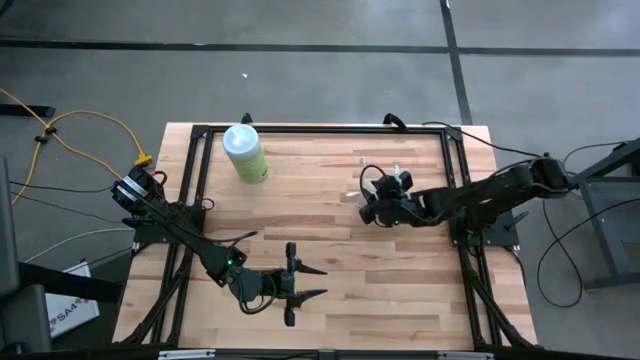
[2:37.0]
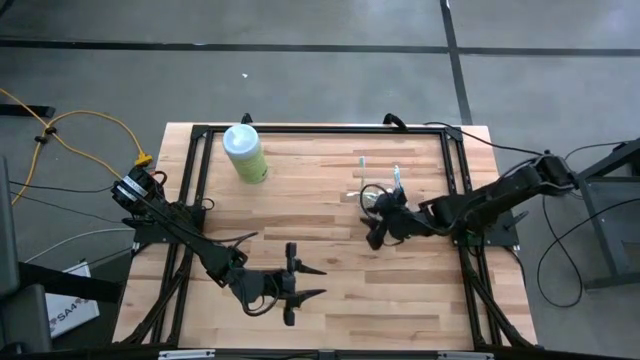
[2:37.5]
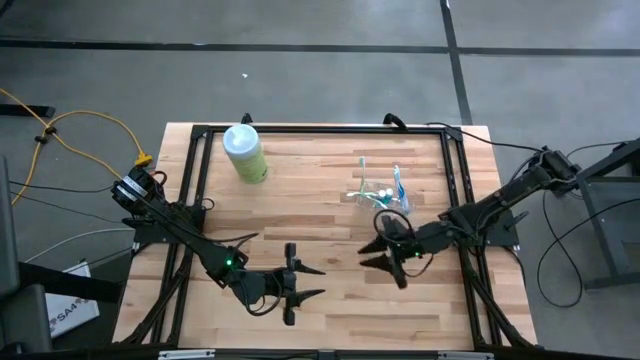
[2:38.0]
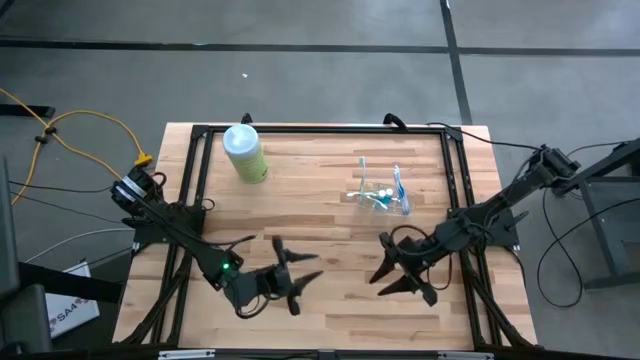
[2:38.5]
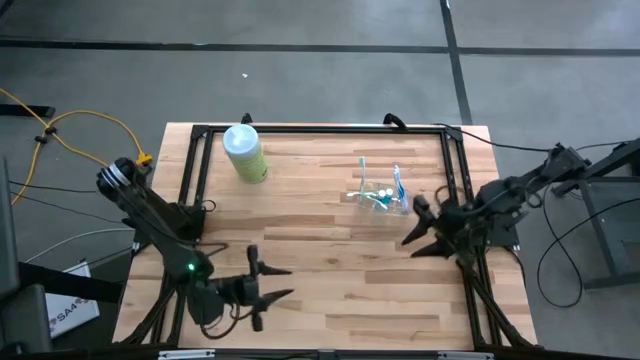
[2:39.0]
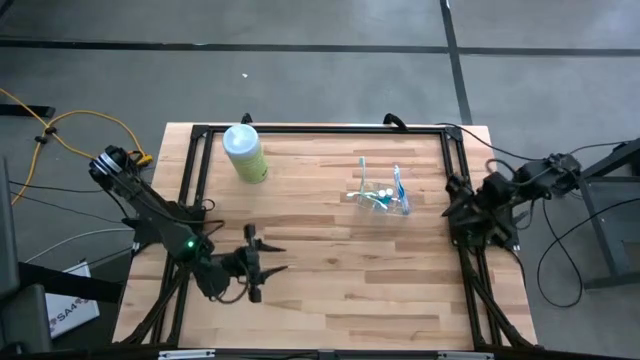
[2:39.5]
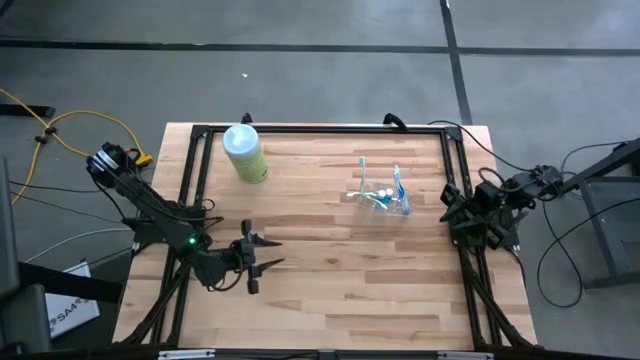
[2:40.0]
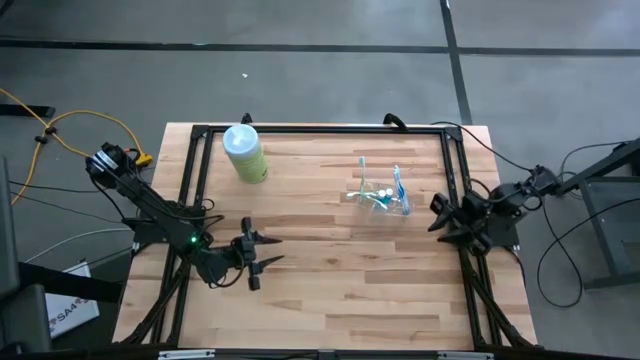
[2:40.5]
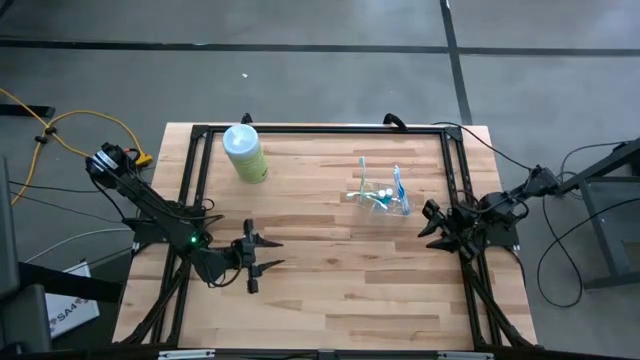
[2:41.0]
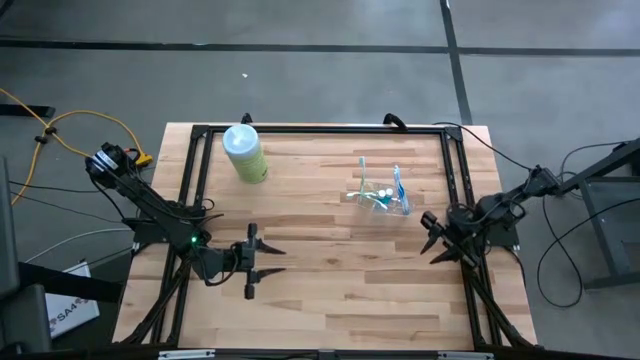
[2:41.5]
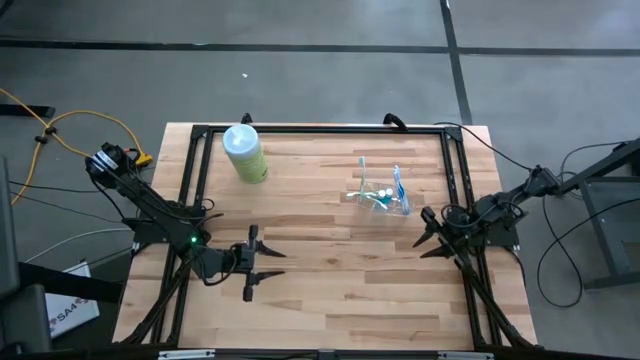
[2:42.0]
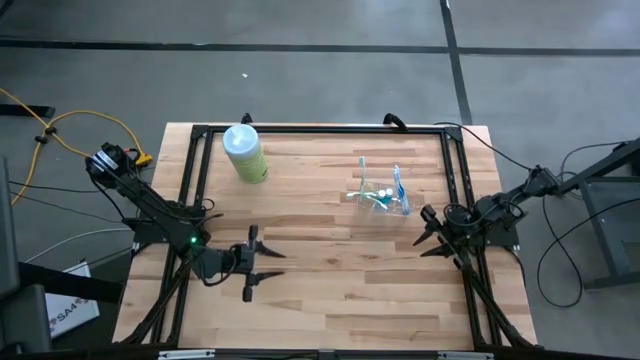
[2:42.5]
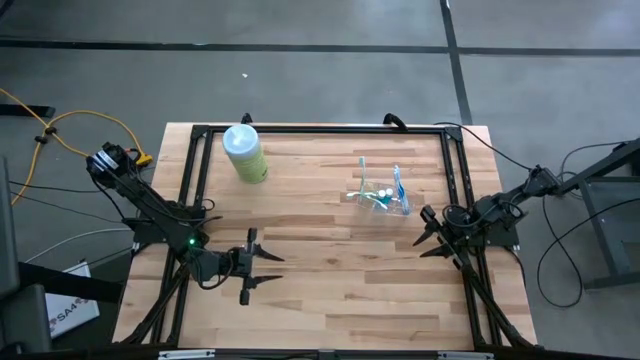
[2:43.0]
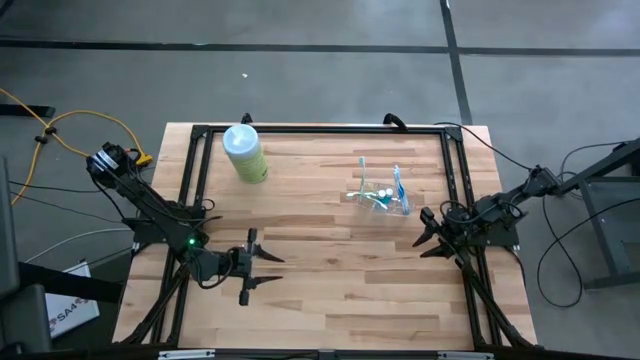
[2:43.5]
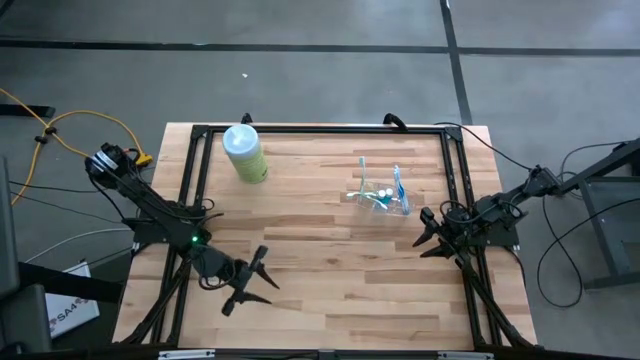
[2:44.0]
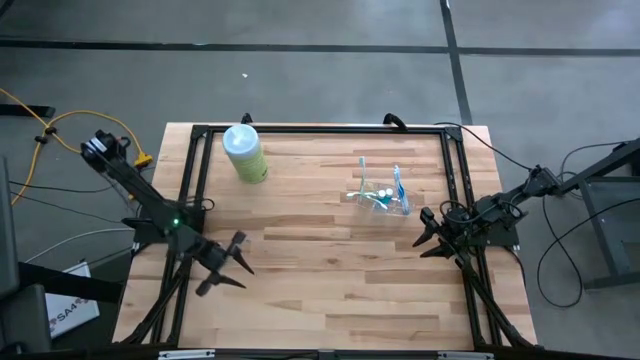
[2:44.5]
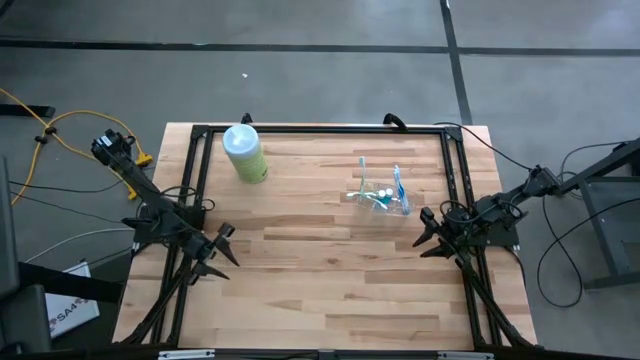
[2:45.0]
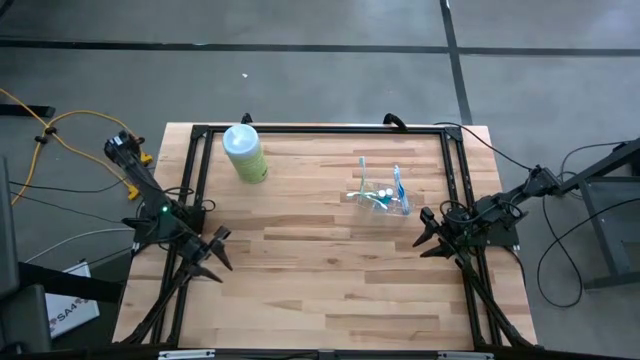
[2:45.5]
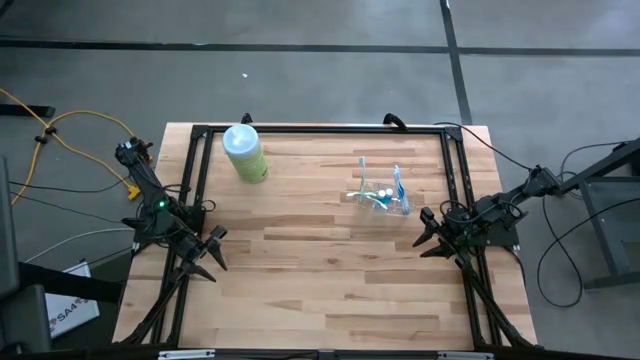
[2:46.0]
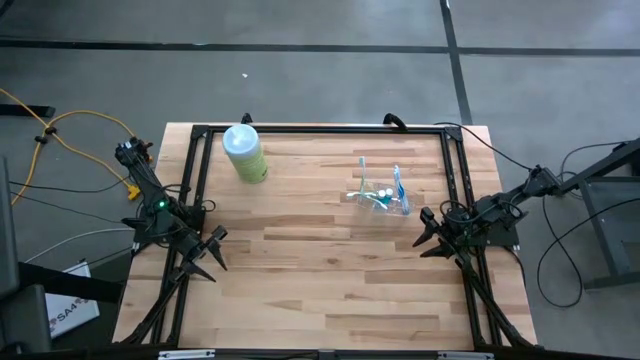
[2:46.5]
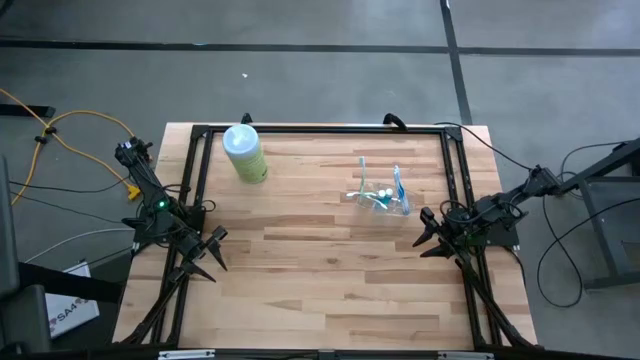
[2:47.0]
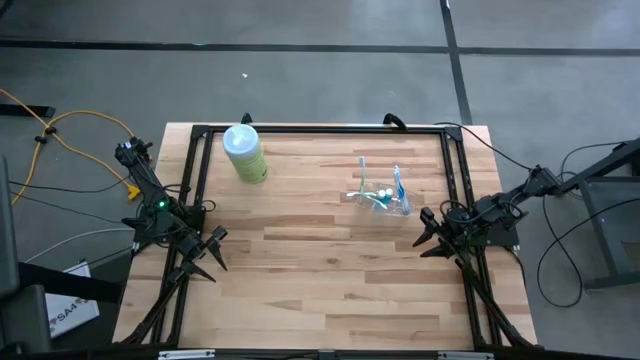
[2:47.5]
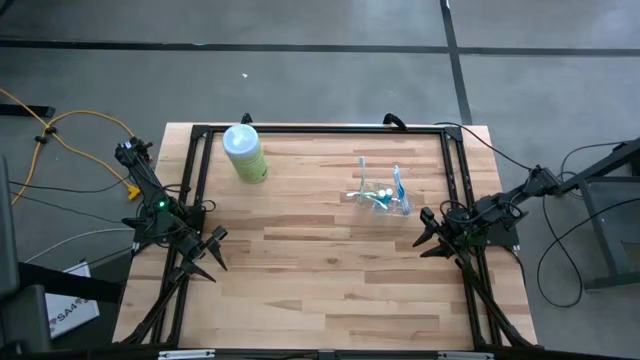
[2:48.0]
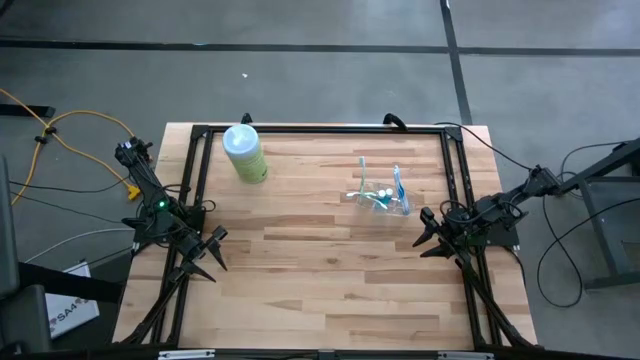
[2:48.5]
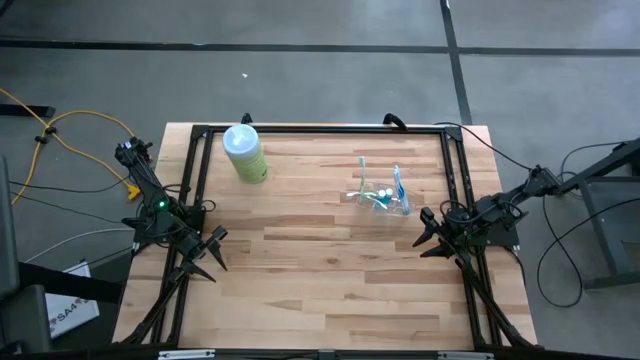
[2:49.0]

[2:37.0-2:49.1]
Task: Pick & Place toothbrushing station
Return to Home Position

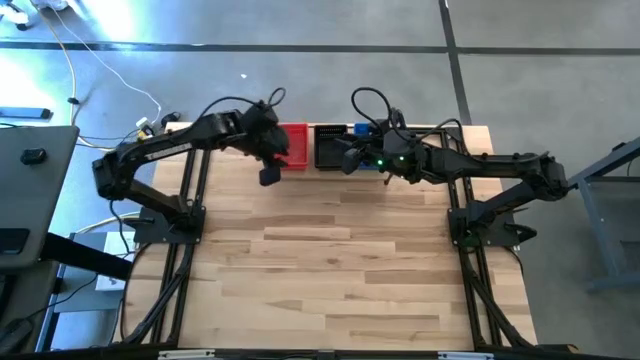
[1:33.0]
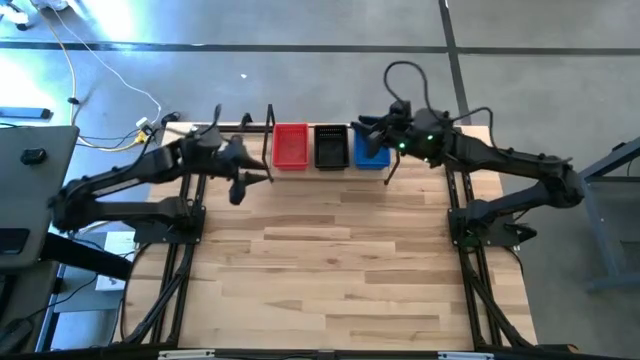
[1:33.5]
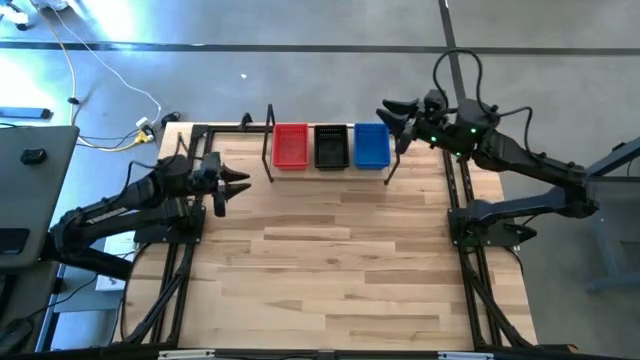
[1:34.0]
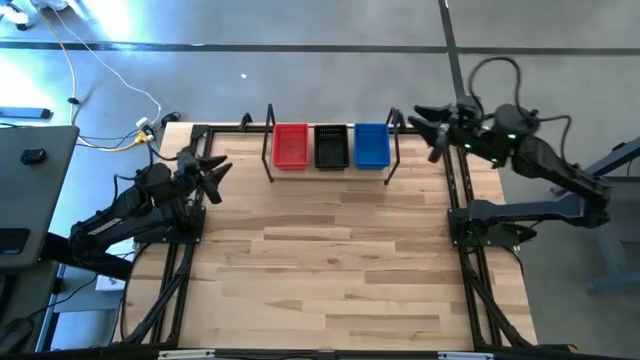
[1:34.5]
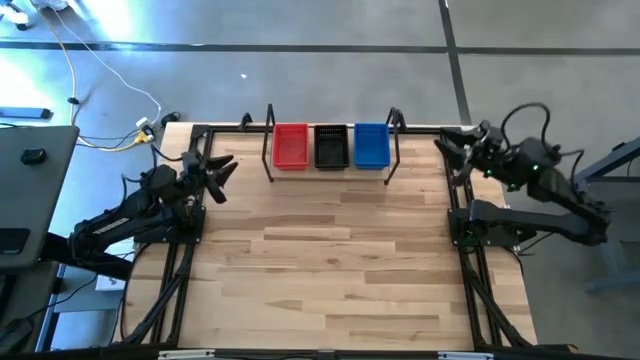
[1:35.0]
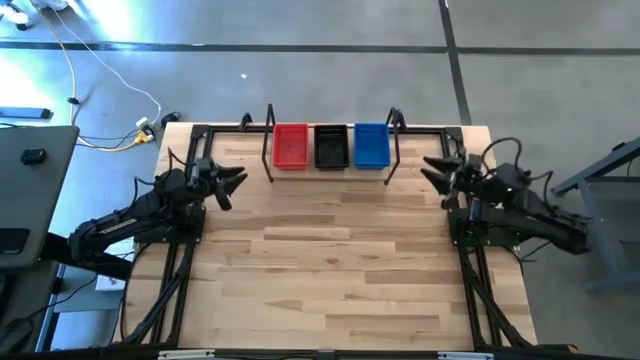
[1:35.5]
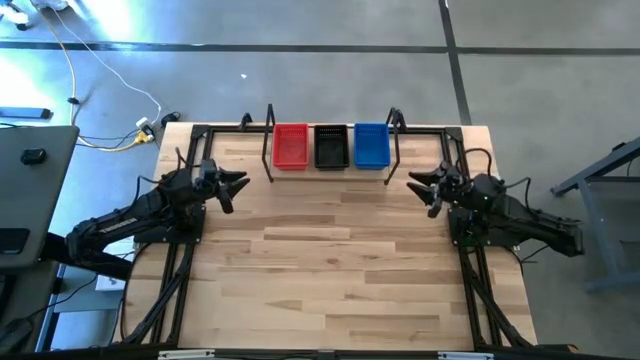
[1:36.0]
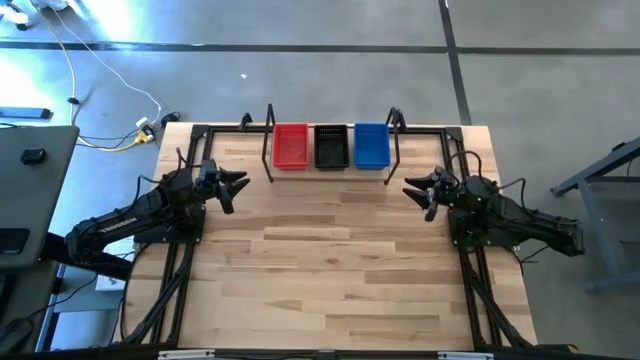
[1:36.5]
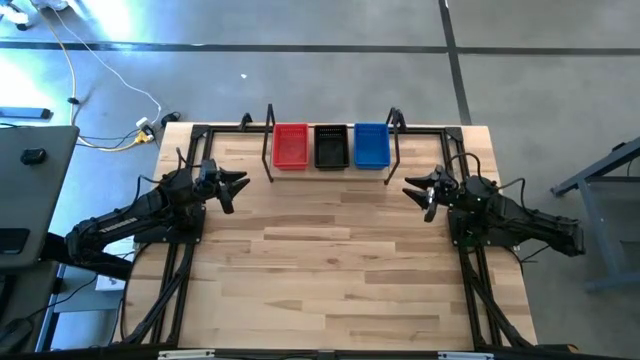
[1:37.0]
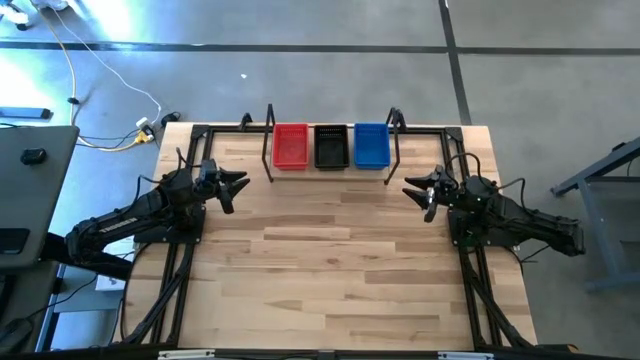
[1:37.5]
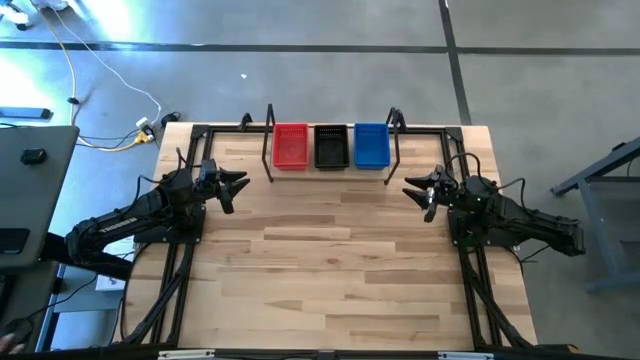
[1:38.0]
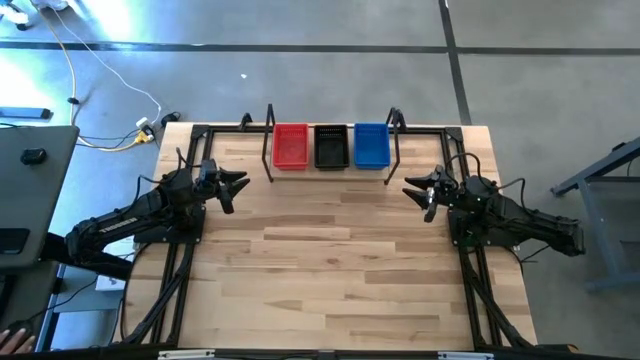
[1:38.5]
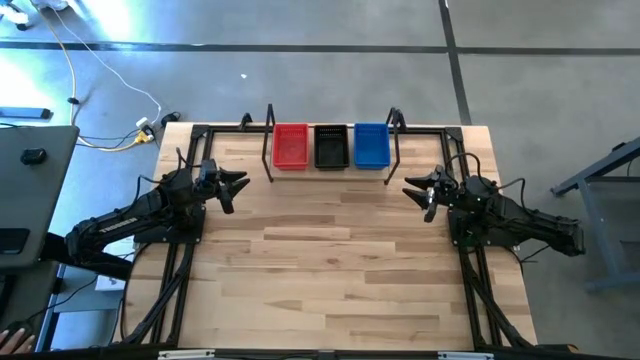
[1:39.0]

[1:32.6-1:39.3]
Task: Stack baskets on shelf by color
Return to Home Position

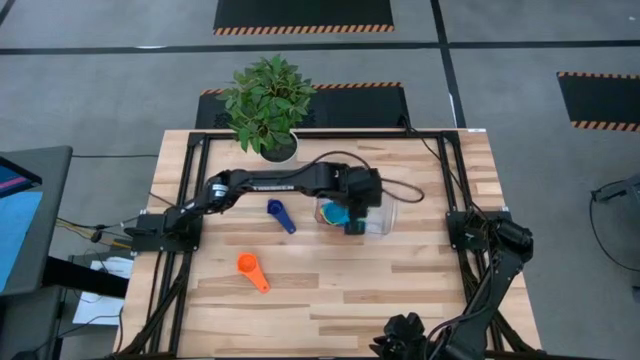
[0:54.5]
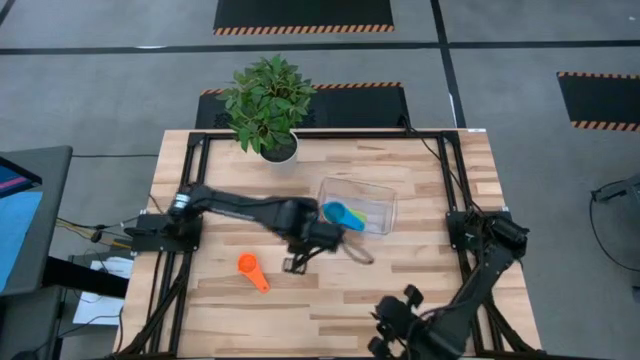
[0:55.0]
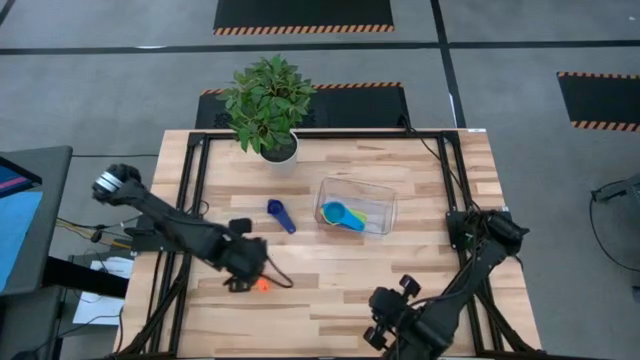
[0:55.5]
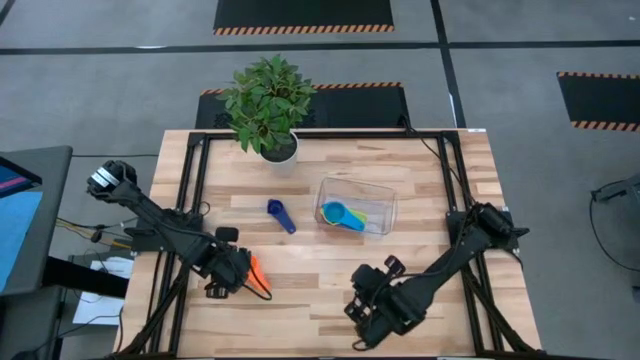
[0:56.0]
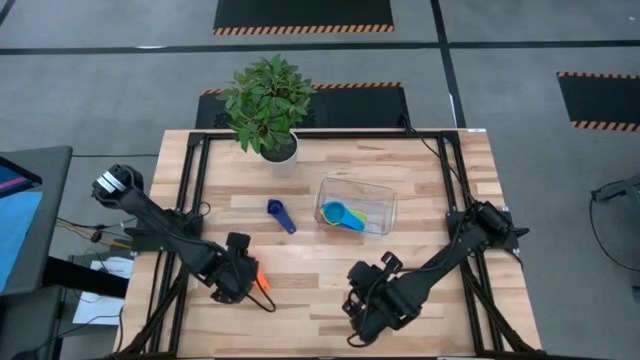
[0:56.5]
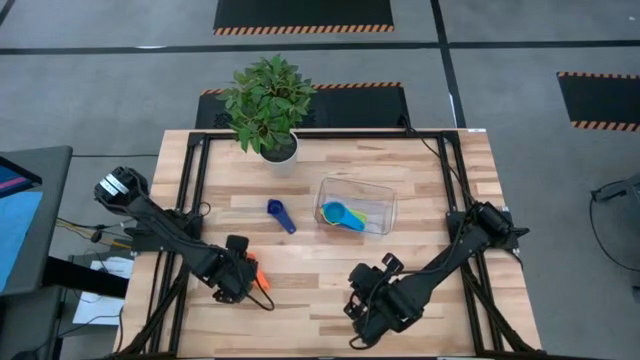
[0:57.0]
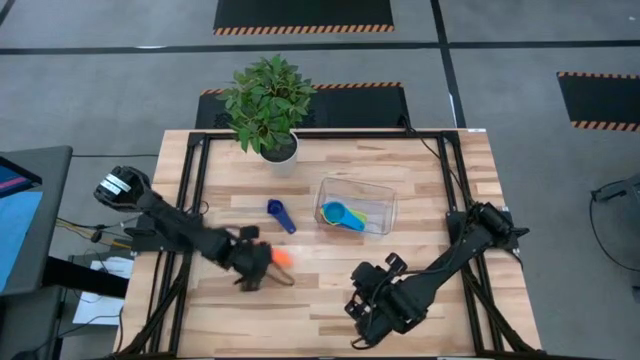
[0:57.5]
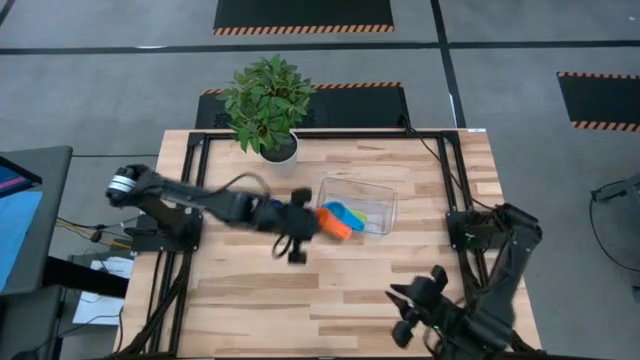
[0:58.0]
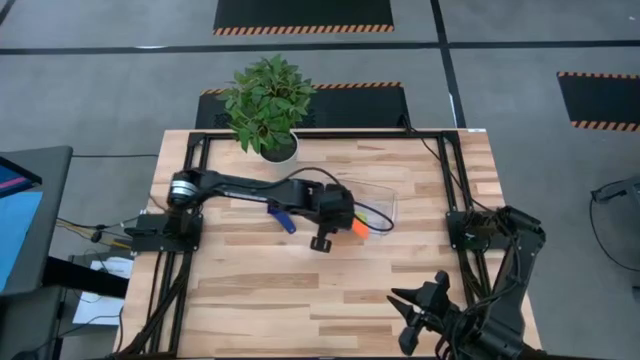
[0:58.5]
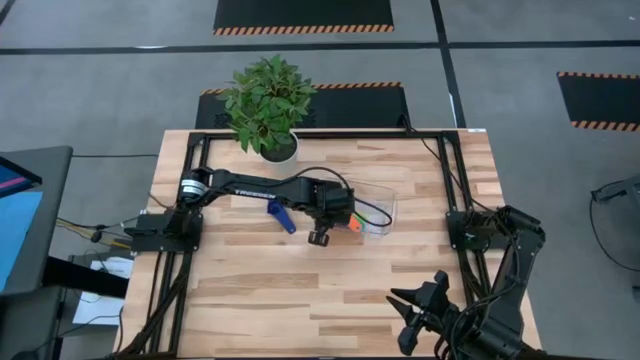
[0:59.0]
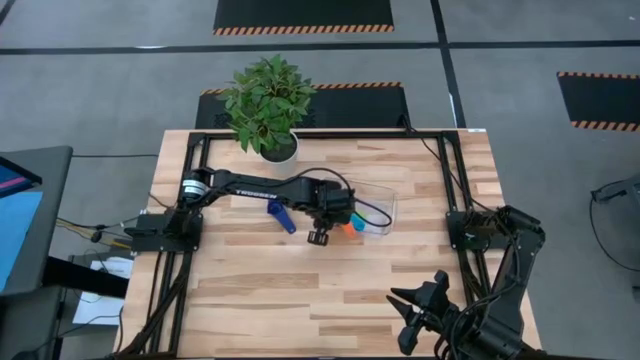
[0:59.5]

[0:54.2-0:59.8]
Task: Nest measuring cups in basket
Stack the orange measuring cup on top of the light blue measuring cup in the transparent bin
